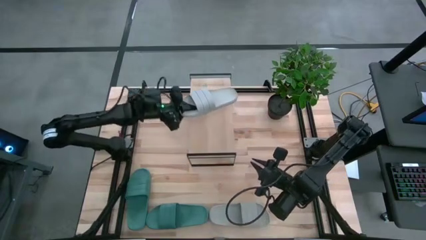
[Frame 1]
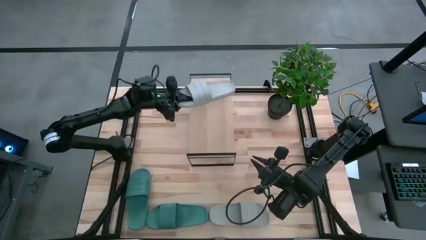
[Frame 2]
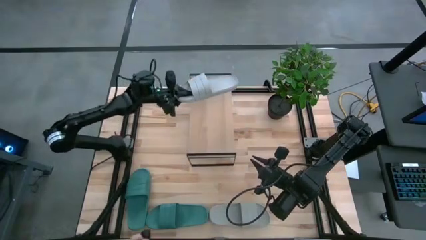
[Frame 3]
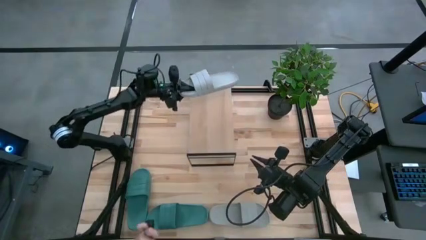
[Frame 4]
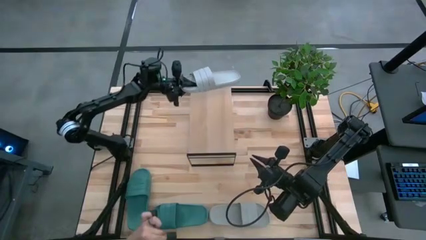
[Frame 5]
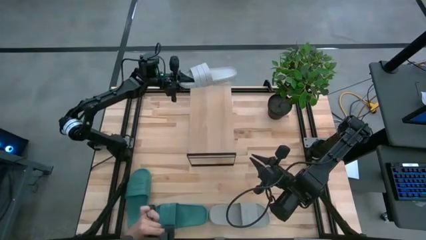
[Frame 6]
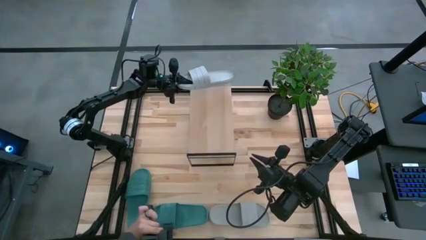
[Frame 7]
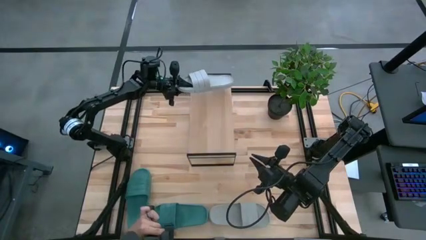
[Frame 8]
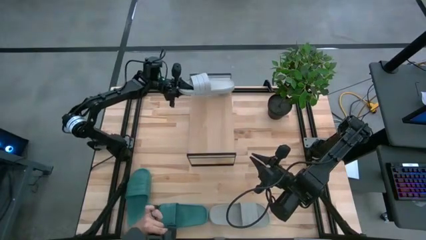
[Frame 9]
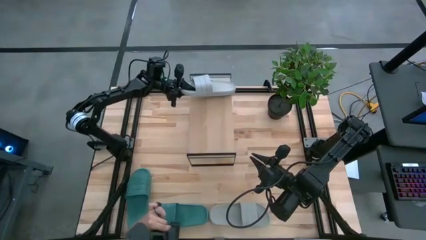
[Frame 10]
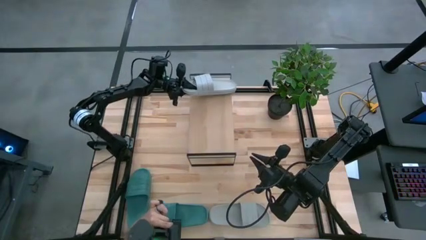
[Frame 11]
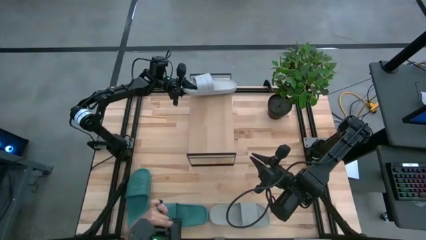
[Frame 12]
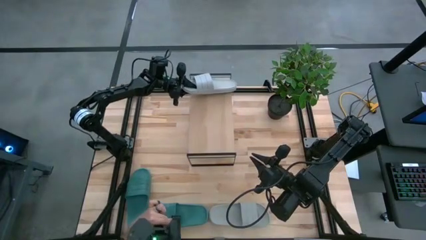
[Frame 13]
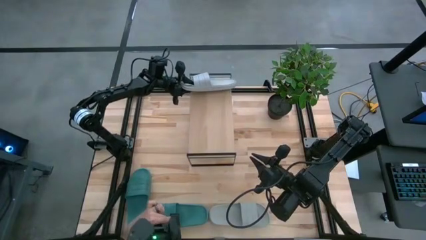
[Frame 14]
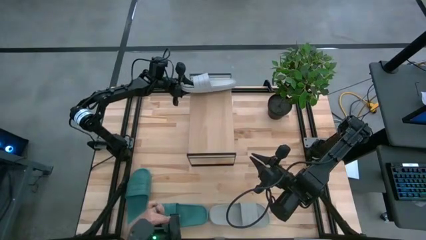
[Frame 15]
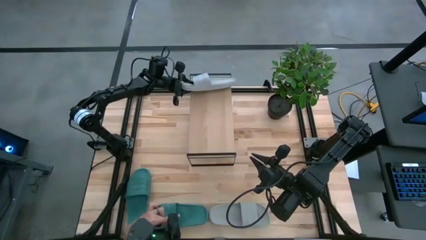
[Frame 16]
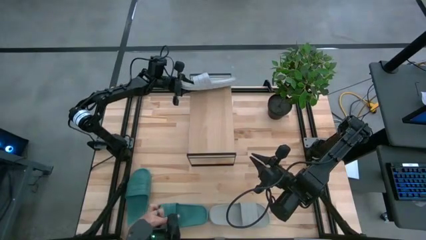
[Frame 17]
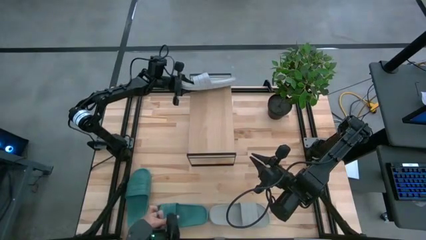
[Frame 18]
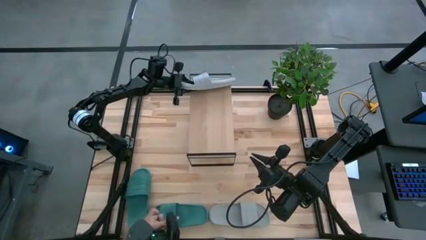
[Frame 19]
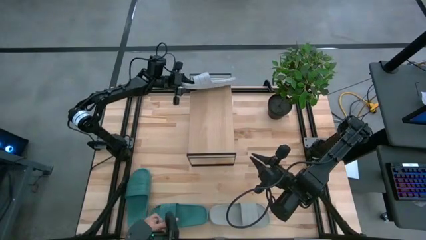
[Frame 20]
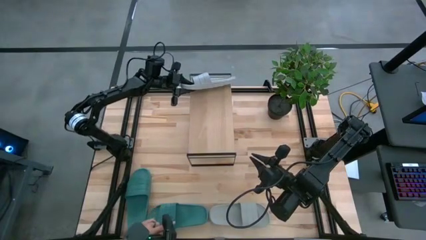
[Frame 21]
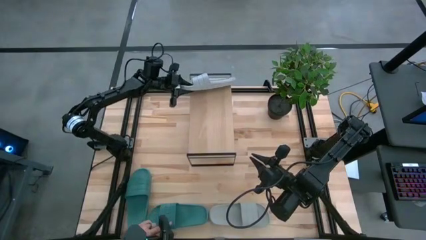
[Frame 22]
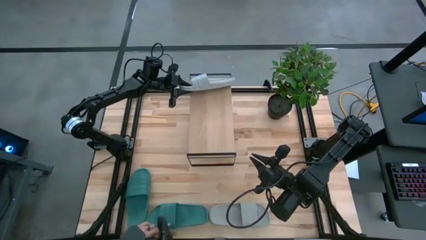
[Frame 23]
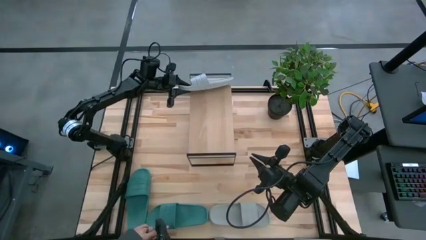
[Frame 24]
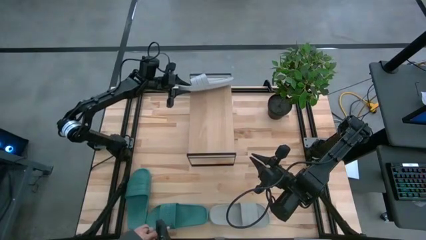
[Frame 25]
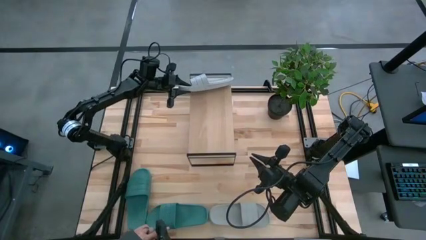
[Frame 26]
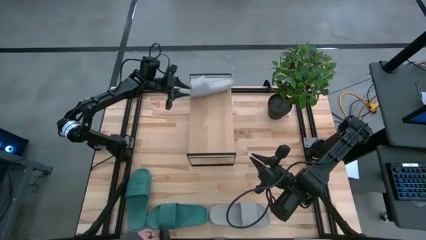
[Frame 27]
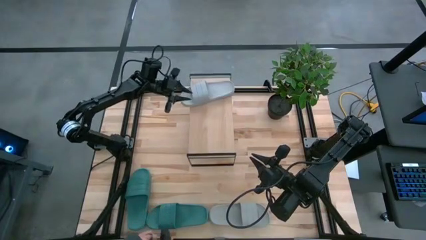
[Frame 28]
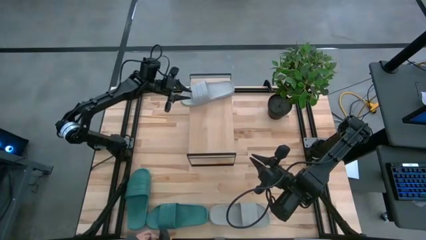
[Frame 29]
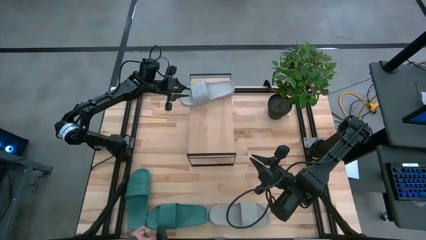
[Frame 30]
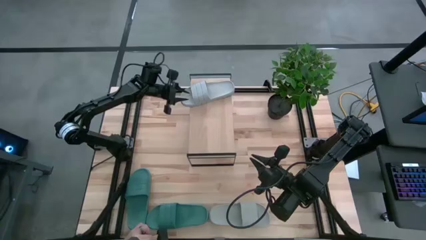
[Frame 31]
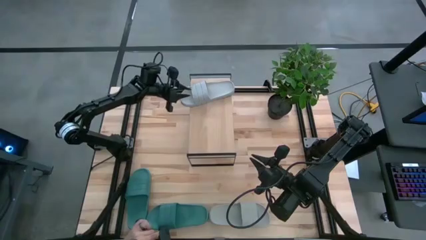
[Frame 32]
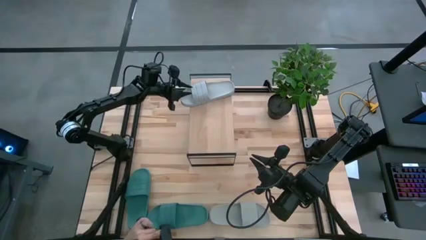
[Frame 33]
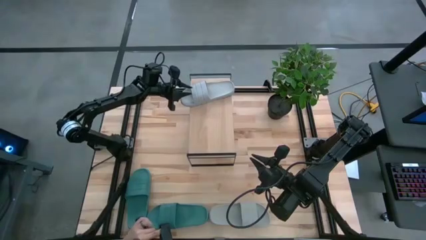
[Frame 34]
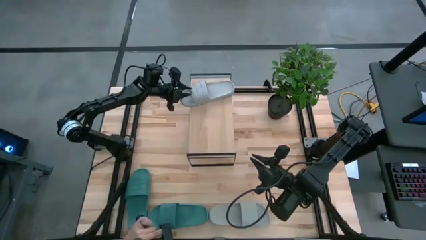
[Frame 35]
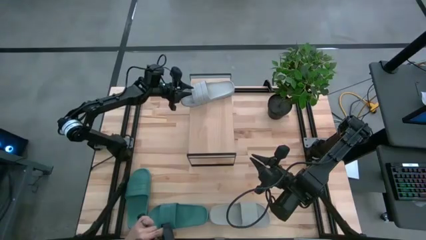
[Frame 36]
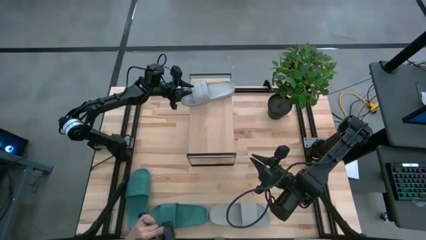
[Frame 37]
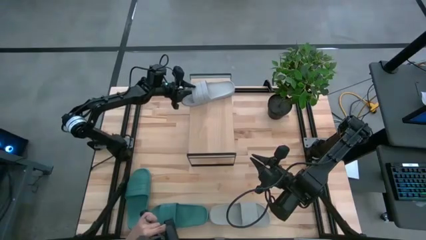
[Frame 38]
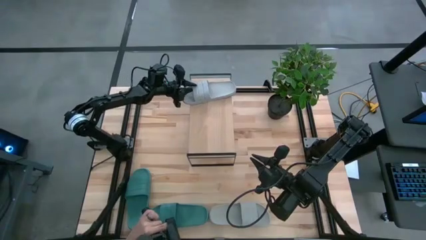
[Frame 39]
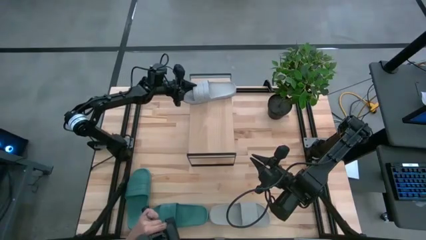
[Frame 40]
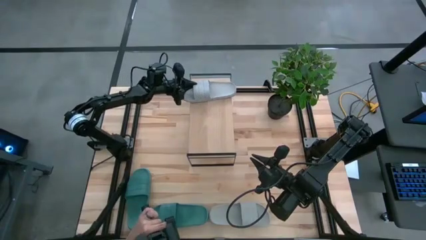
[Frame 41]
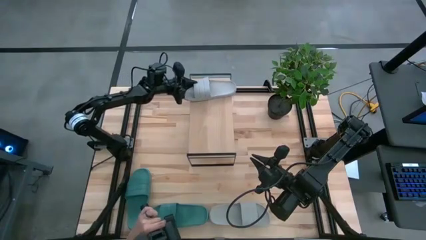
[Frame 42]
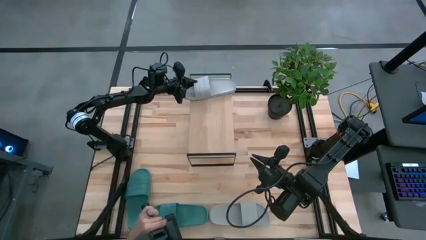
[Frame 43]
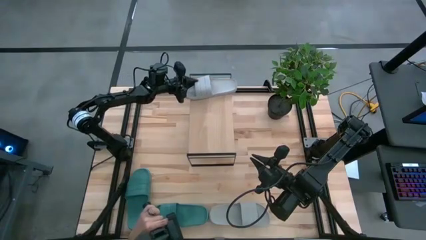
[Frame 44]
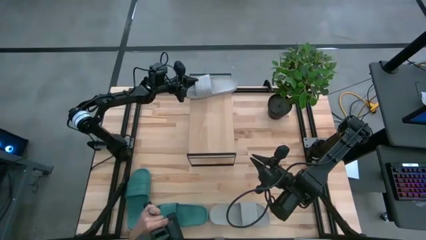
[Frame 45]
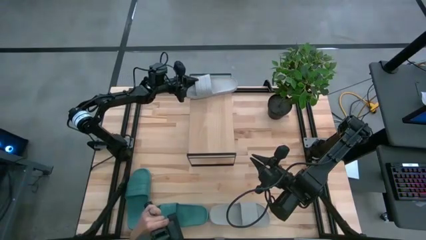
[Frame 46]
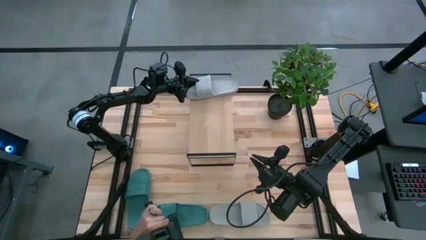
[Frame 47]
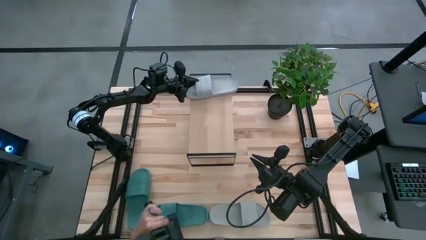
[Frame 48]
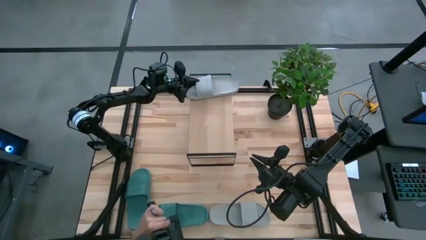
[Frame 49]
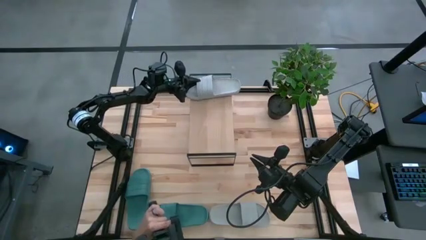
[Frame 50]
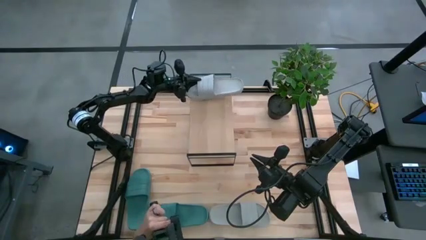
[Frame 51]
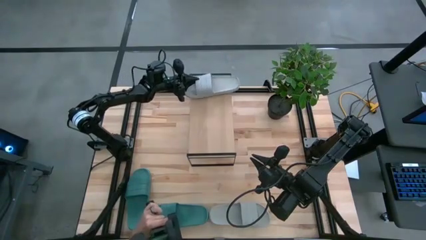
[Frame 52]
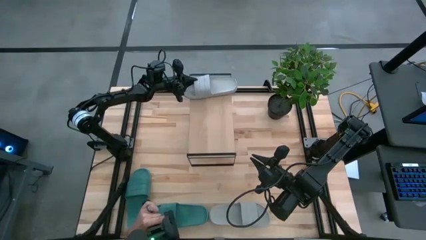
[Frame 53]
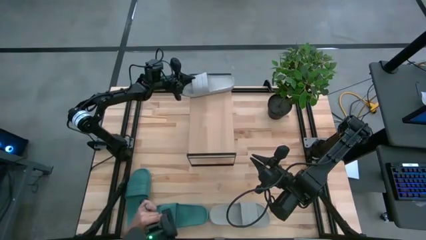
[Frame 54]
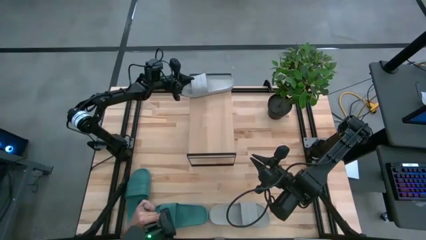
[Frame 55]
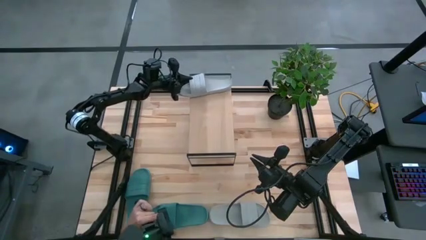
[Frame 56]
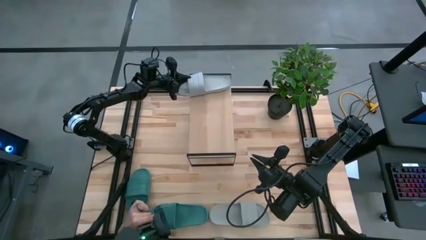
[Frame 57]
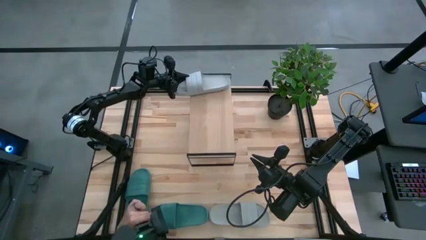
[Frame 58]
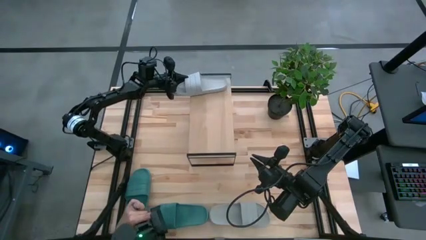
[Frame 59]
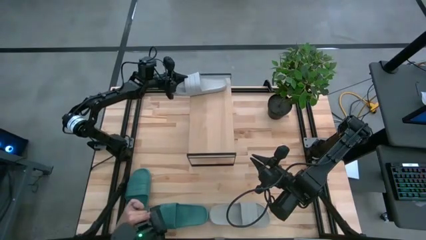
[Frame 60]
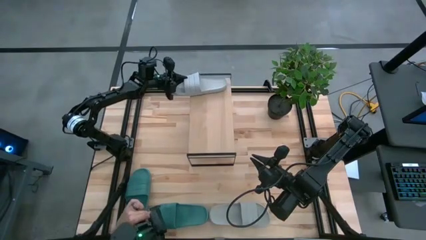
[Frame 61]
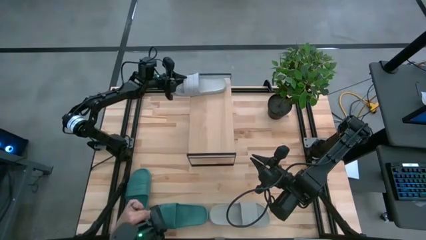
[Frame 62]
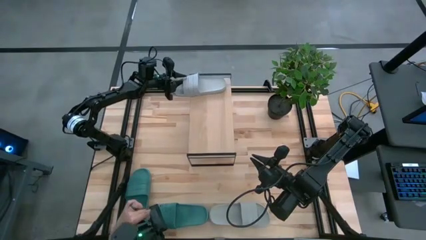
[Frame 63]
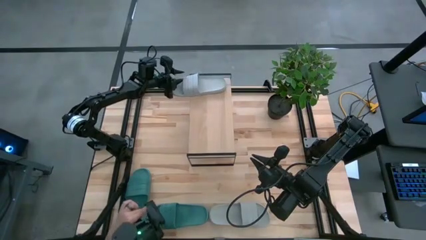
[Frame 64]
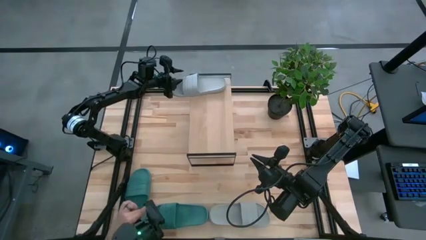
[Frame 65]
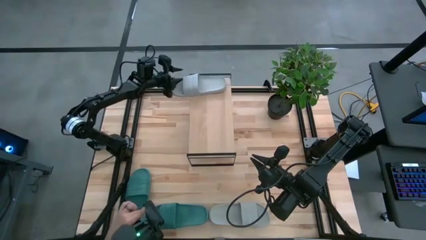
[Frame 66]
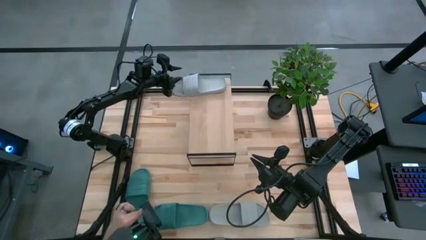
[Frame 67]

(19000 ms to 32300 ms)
Task: Pick and place slides into the shelf
Put the right gray slide on the shelf

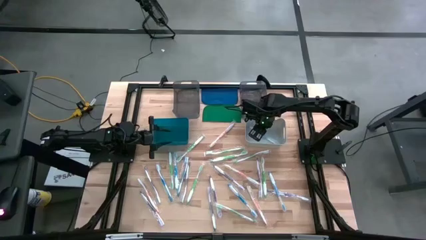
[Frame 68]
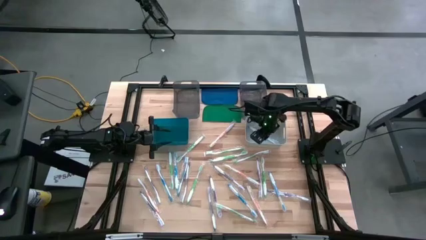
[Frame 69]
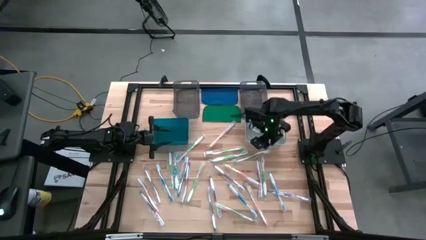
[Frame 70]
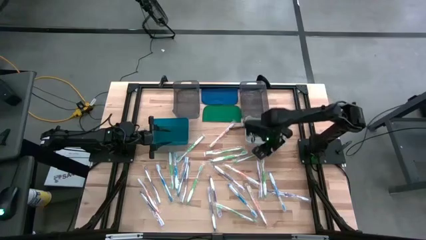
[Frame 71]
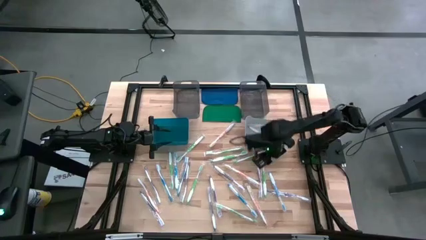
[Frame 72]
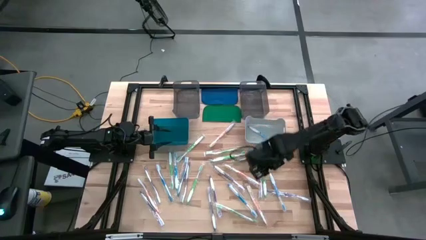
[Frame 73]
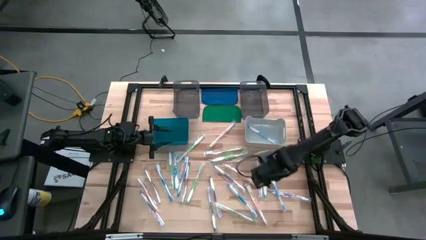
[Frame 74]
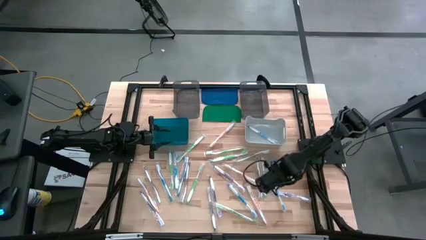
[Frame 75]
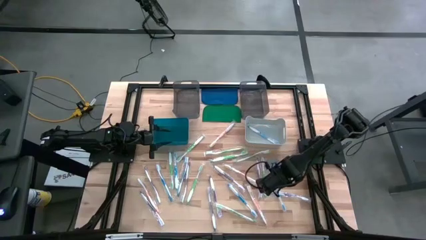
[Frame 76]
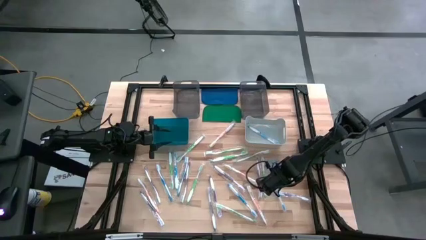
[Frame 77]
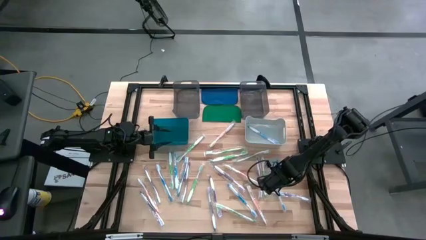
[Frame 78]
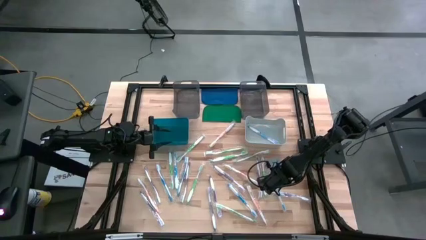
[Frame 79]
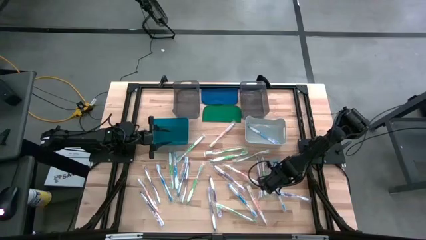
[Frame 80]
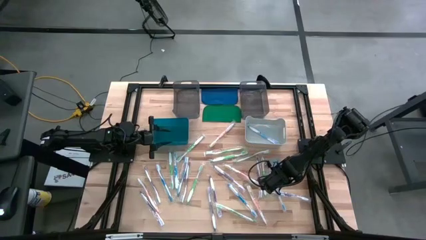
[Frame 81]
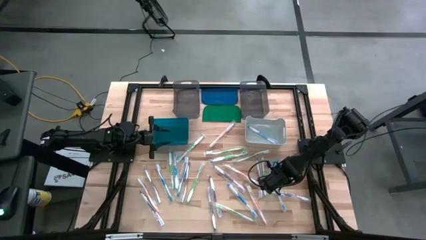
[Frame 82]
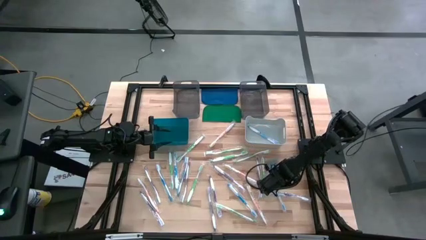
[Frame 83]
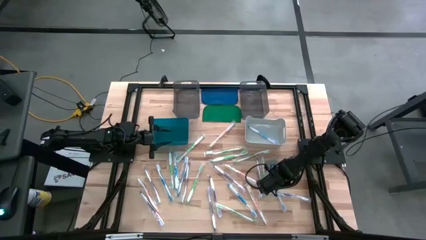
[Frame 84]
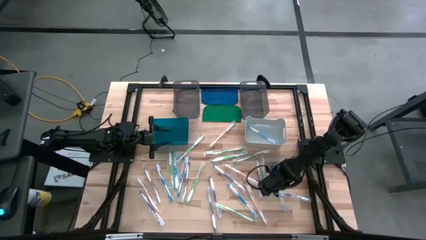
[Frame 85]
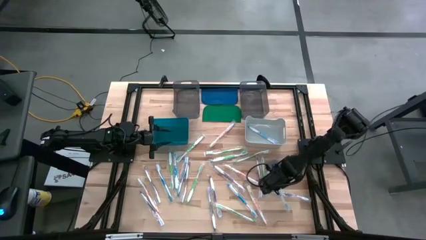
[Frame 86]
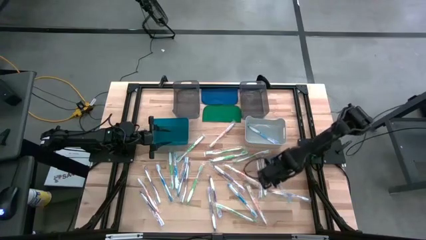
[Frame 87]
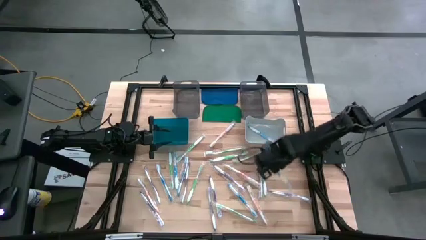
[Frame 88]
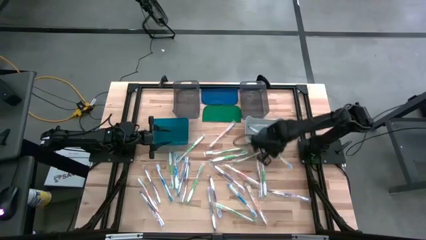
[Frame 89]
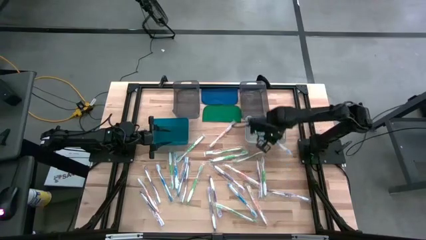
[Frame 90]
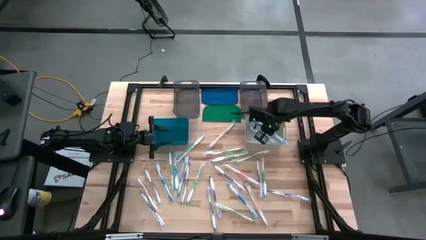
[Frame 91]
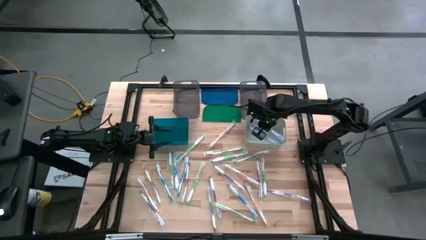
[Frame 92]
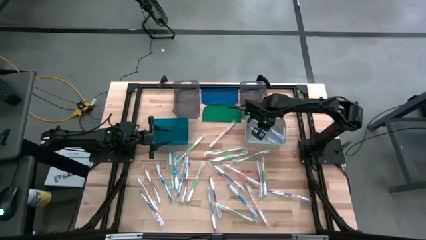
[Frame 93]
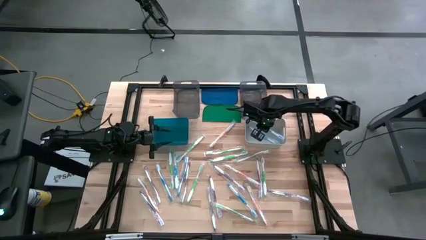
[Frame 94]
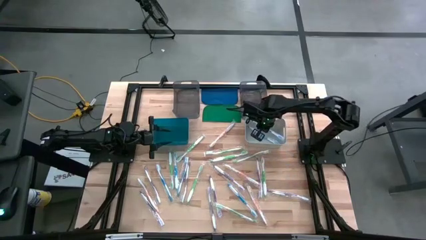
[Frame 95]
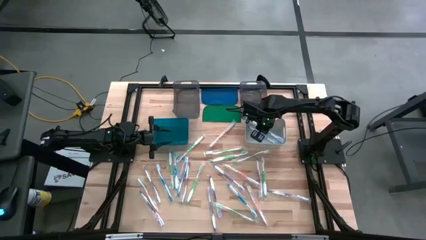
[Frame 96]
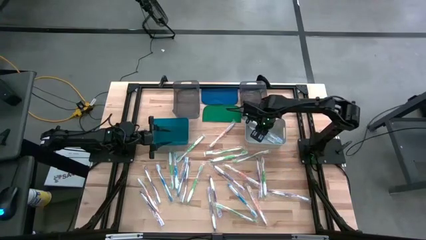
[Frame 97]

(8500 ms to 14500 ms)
Task: Pick & Place Toothbrushes
Put the blue toothbrush into the grey bin
